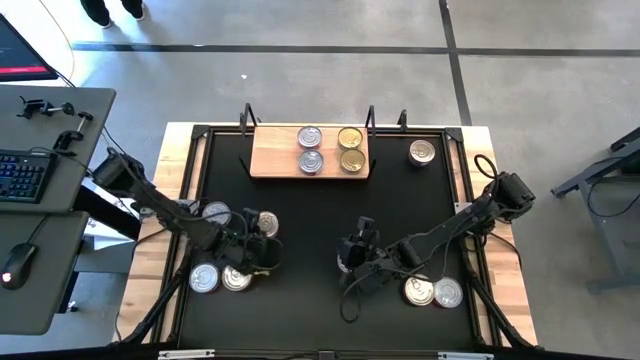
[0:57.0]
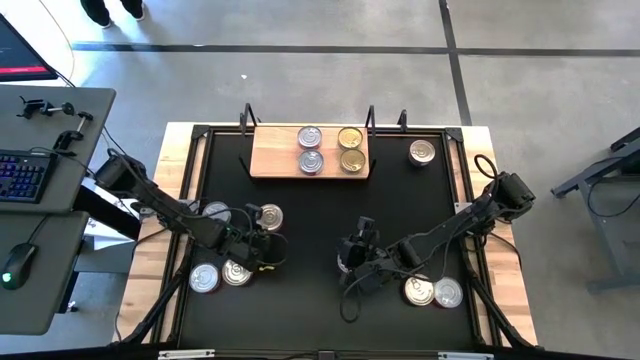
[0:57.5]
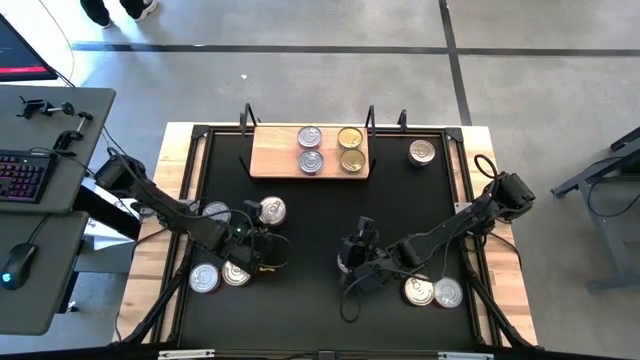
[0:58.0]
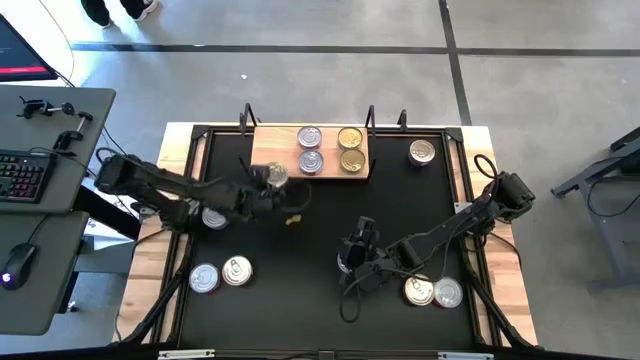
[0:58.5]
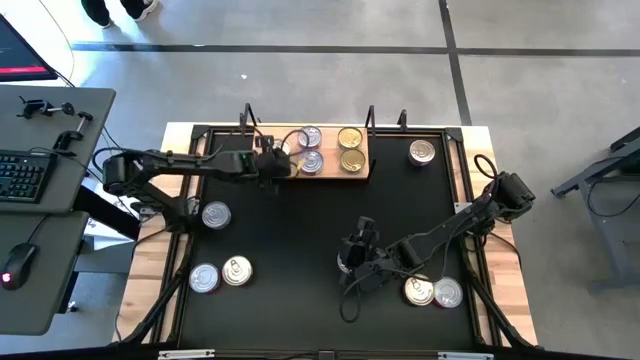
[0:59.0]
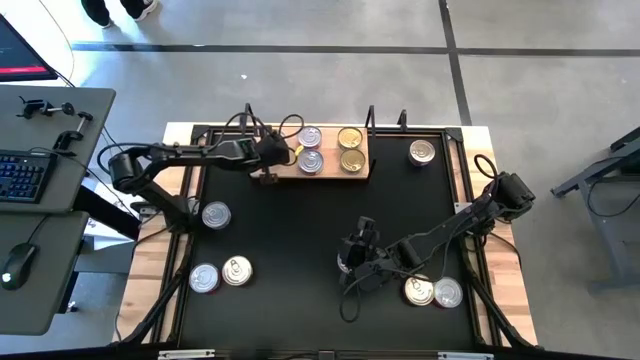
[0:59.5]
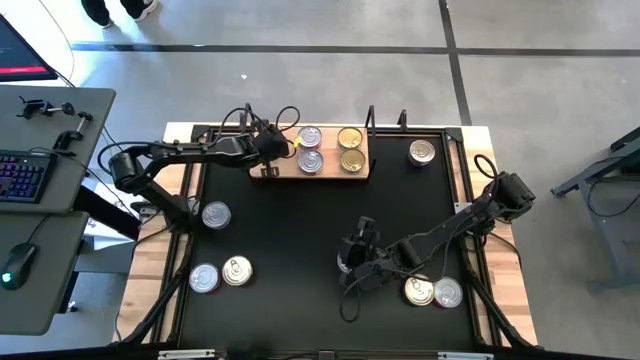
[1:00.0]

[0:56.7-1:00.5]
Task: Stack canned seafood by type on shelf
Put the blue tuna can on the shelf

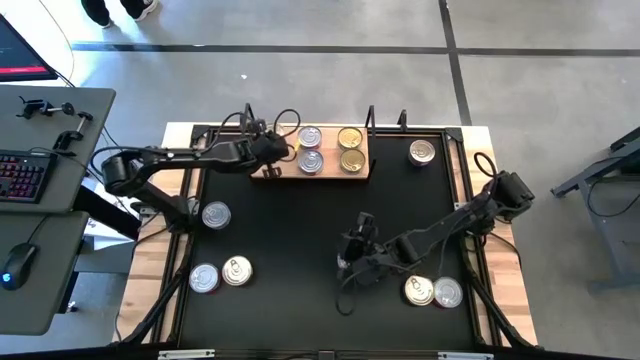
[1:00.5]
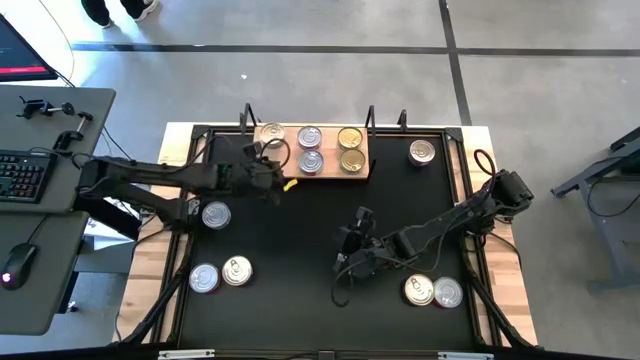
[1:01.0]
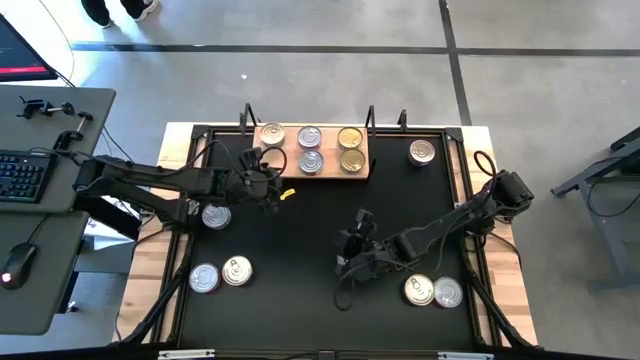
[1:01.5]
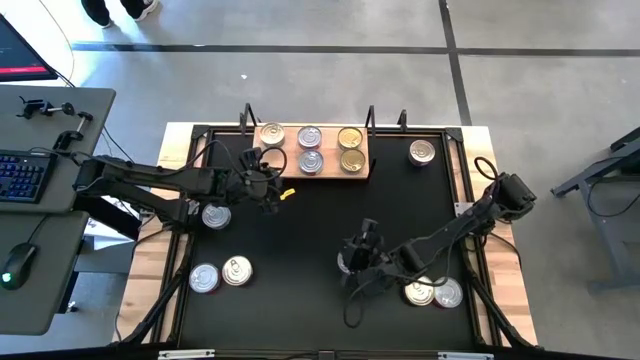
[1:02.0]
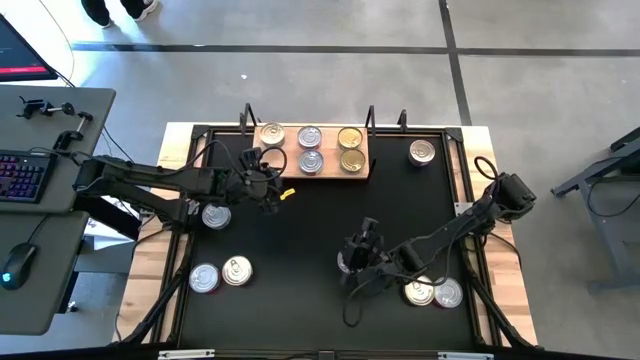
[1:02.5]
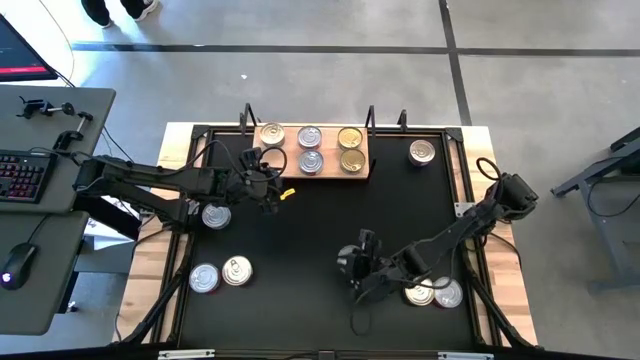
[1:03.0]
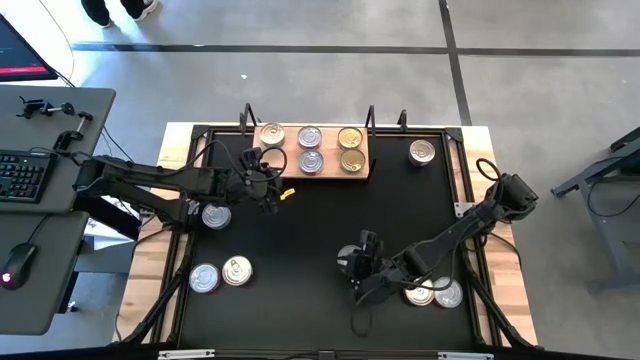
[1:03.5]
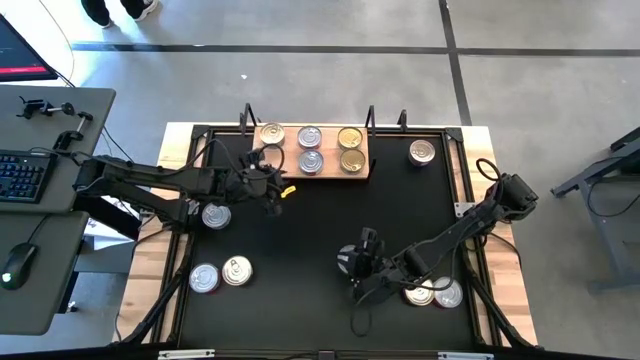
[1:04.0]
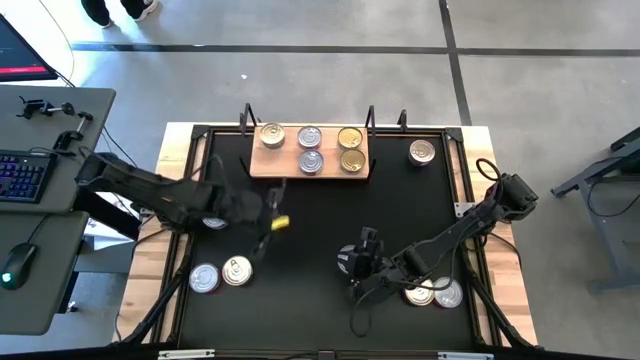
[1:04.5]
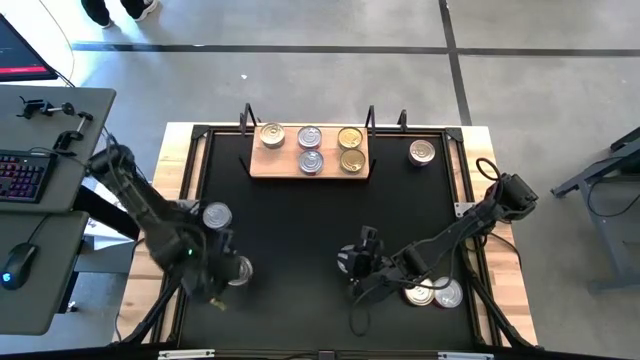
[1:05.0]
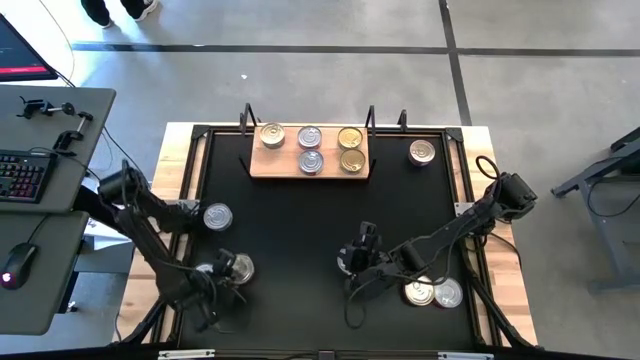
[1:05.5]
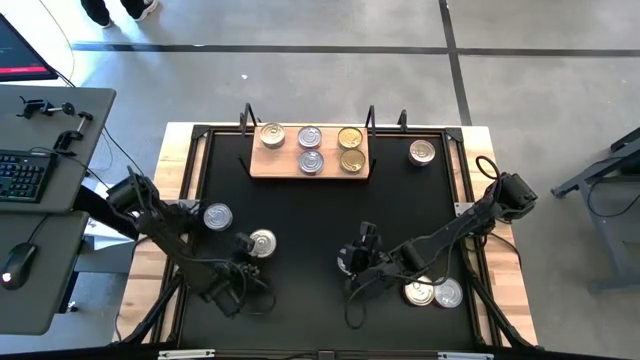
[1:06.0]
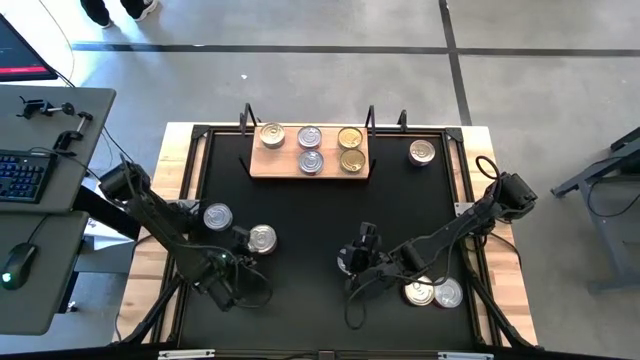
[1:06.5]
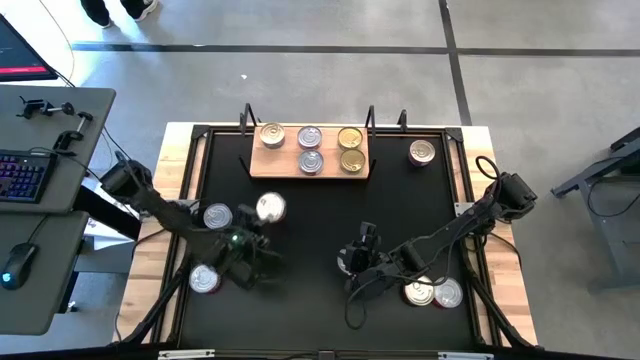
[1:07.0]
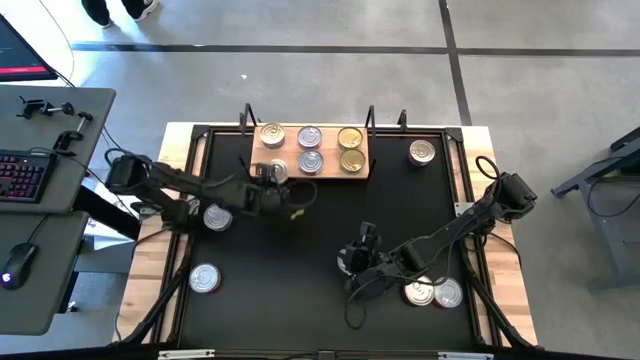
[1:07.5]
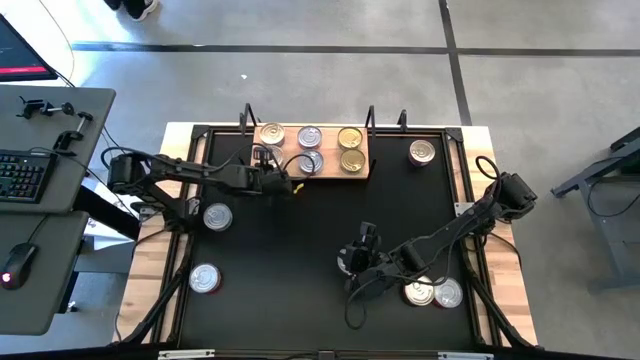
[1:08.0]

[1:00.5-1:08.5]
Put the blue tuna can on the shelf aligned with the other blue tuna can

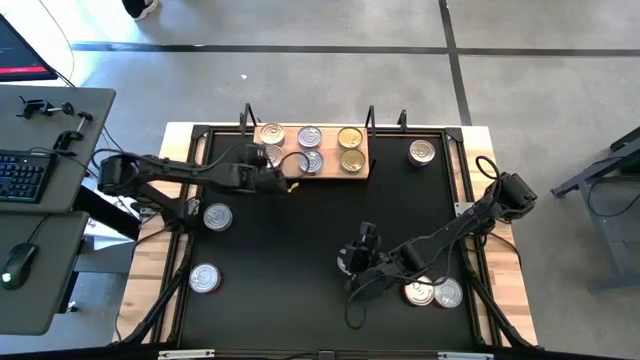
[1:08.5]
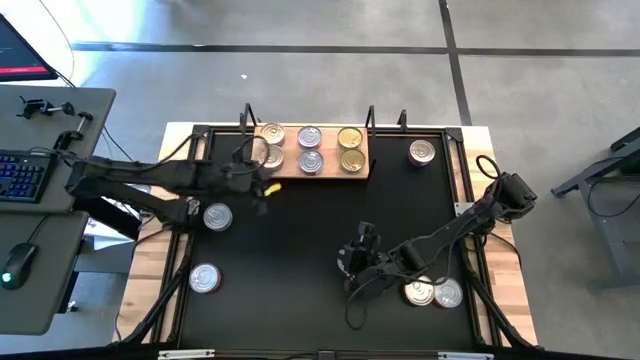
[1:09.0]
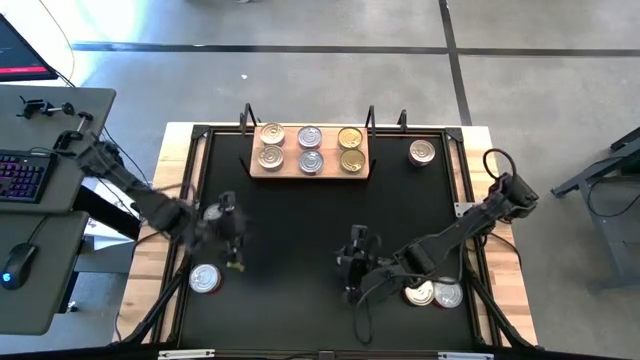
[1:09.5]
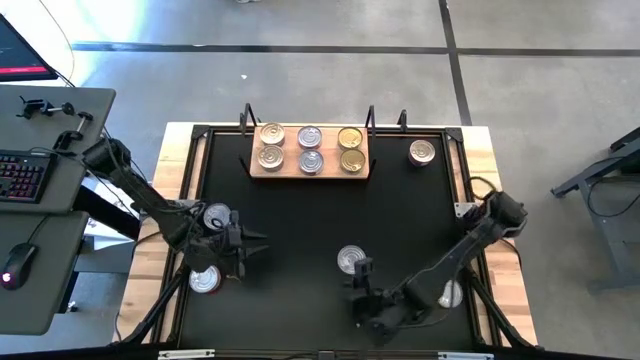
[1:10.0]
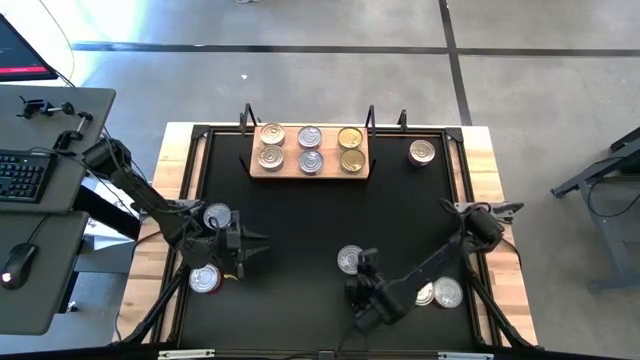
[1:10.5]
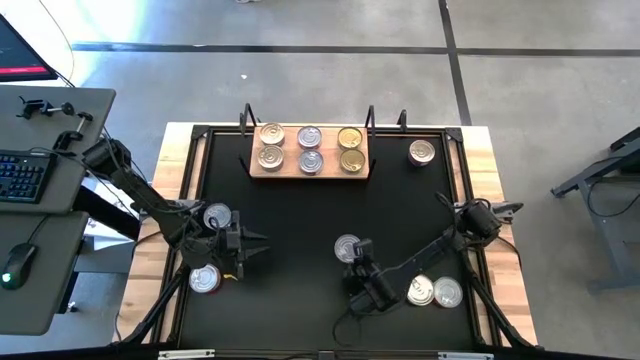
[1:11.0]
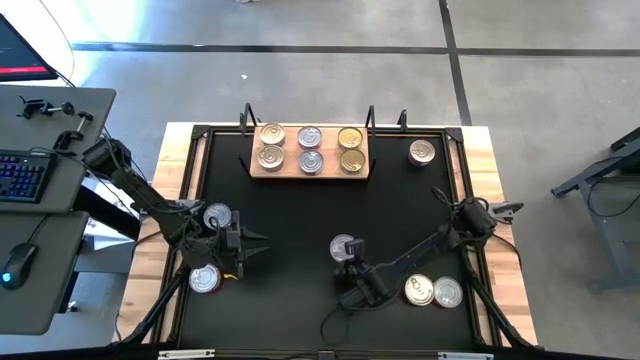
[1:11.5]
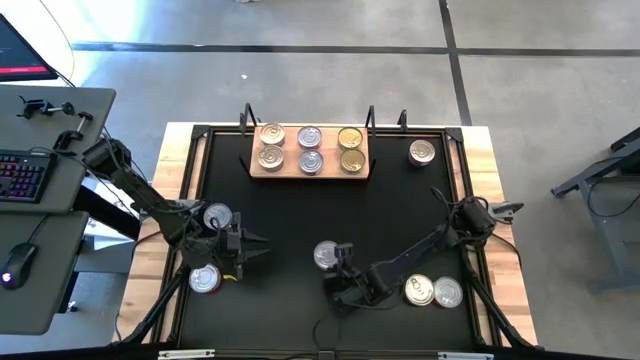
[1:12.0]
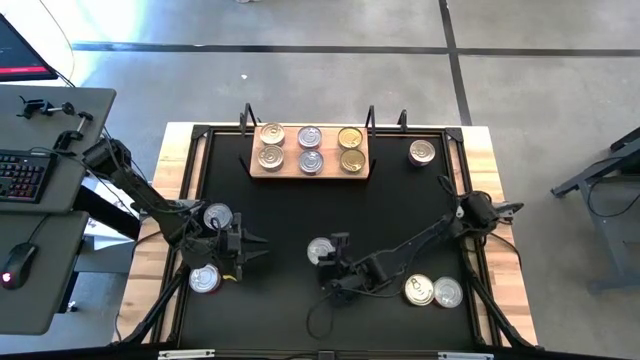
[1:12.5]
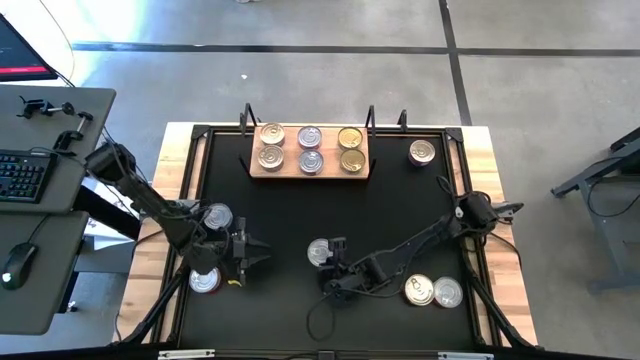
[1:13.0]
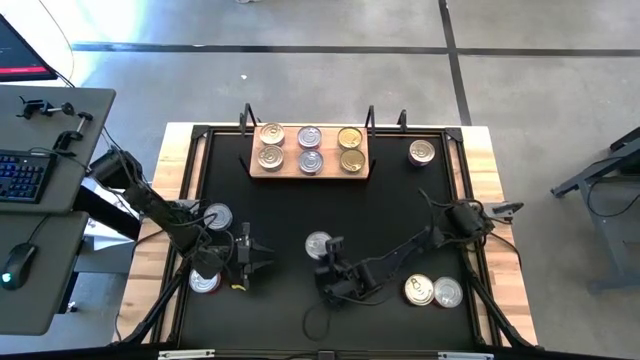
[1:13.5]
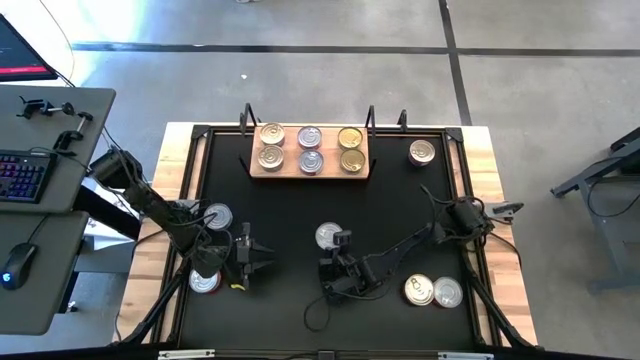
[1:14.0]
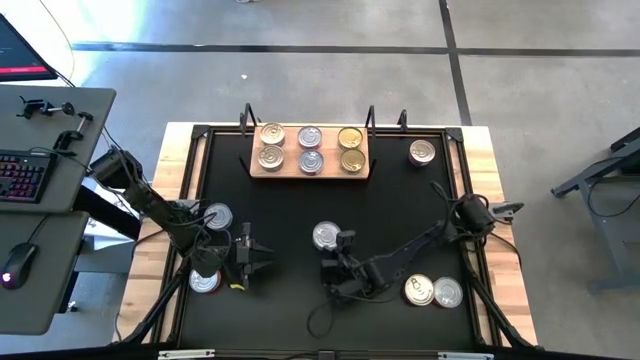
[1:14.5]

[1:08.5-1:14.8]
Stack the green tuna can on top of the other green tuna can on the shelf

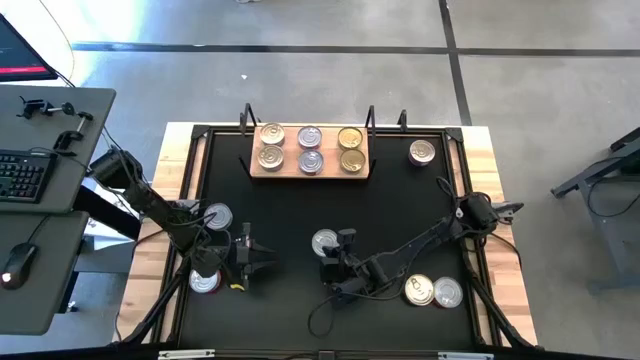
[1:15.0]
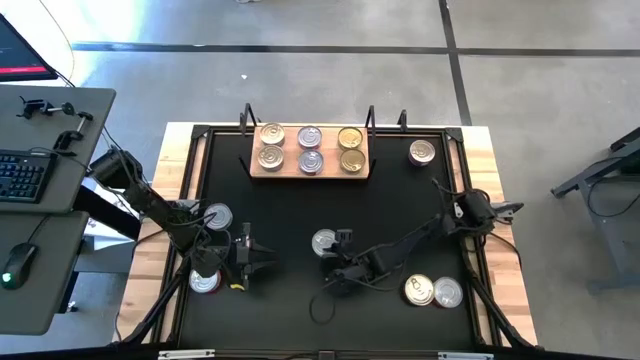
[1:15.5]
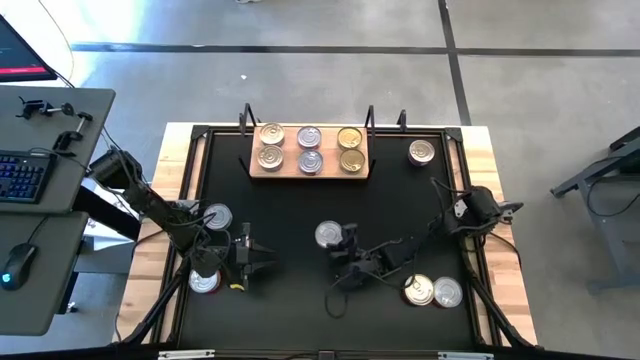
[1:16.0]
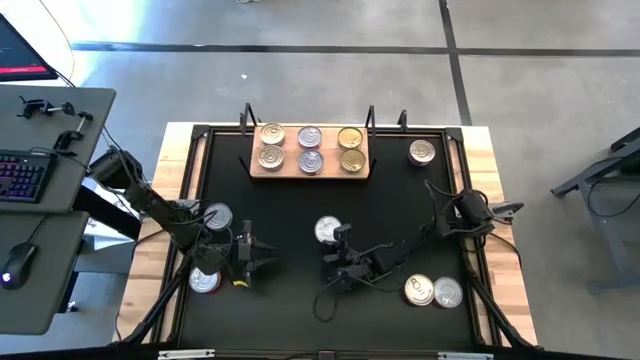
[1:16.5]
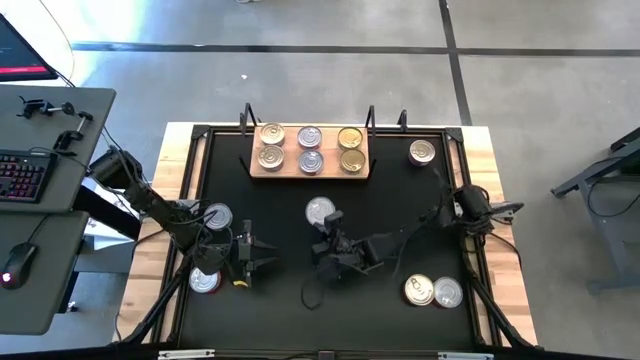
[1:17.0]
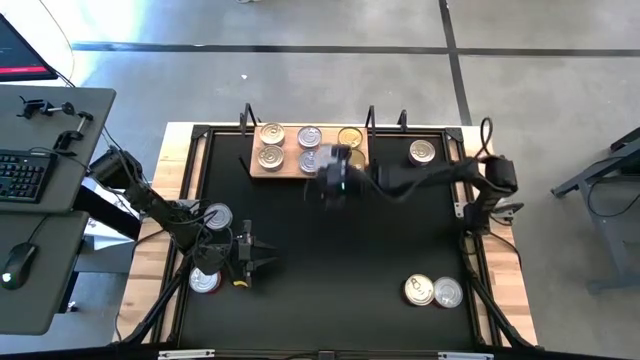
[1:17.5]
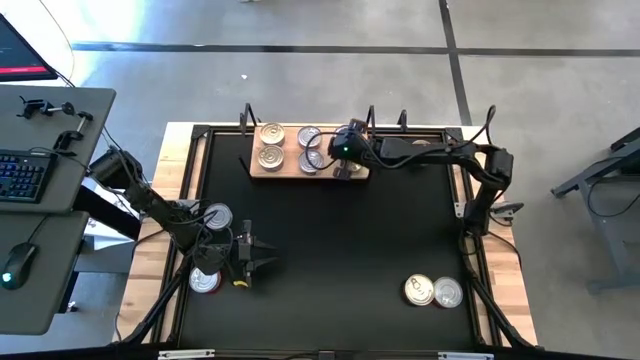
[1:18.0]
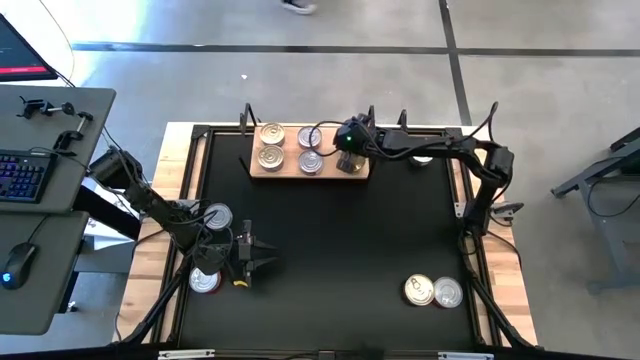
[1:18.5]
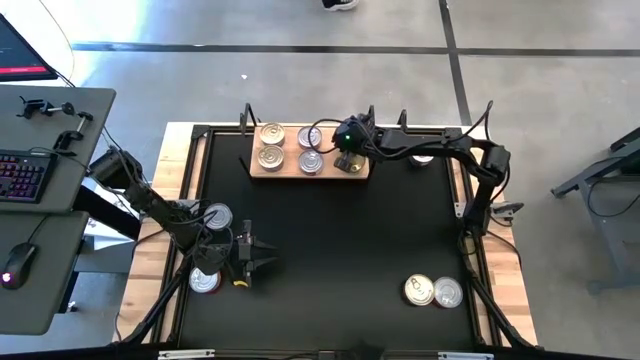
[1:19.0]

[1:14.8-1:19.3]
Stack the green tuna can on top of the other green tuna can on the shelf
